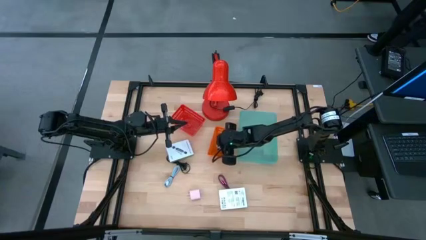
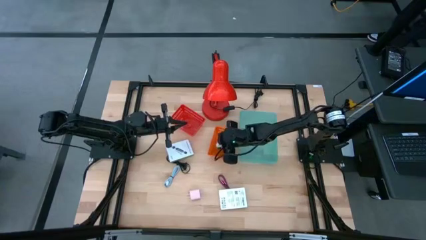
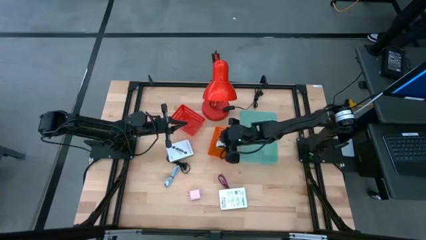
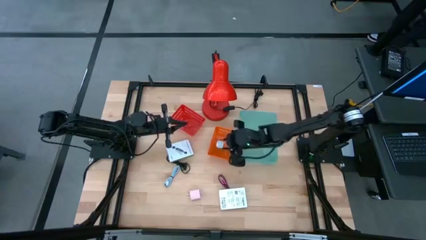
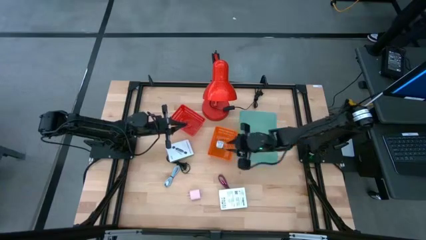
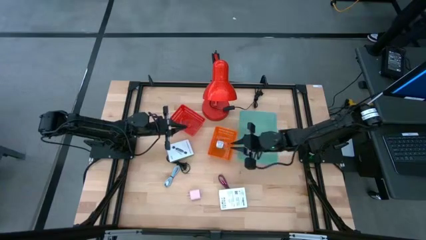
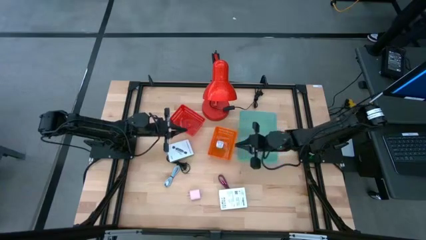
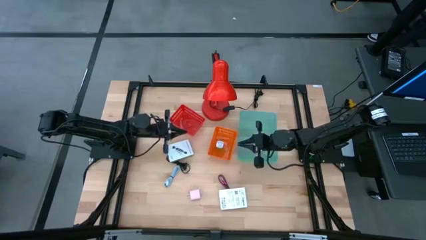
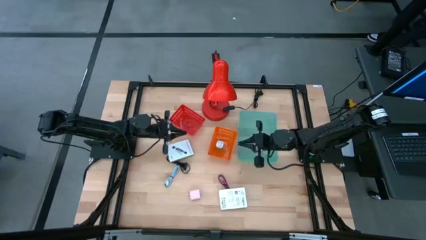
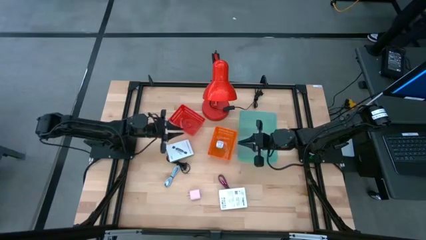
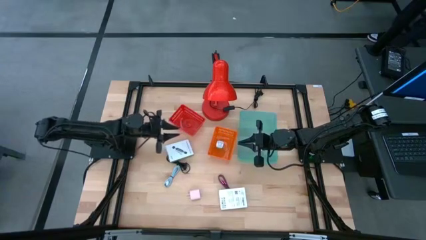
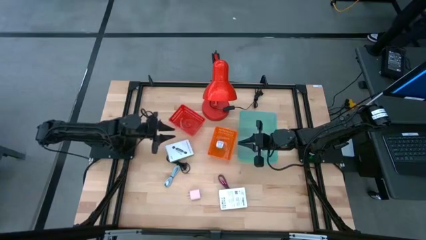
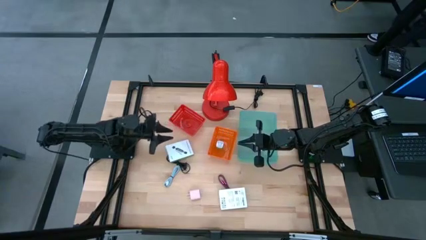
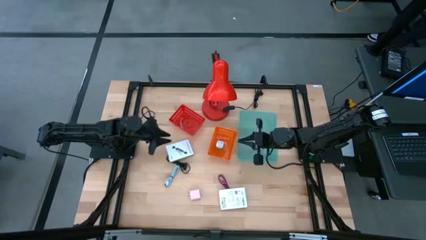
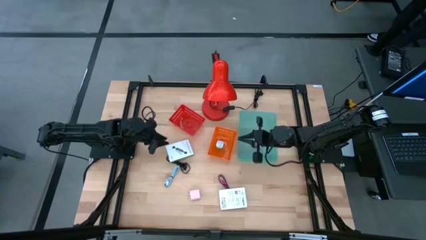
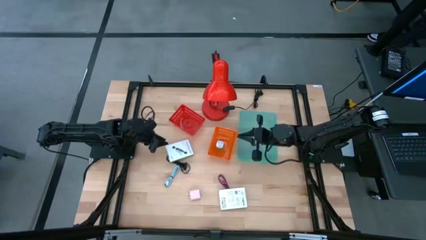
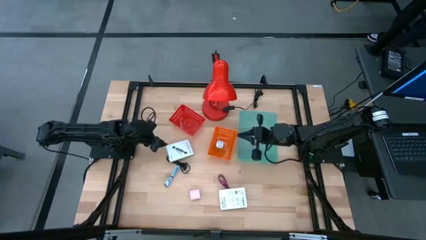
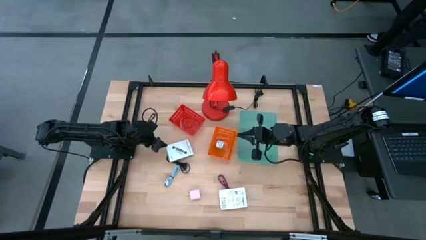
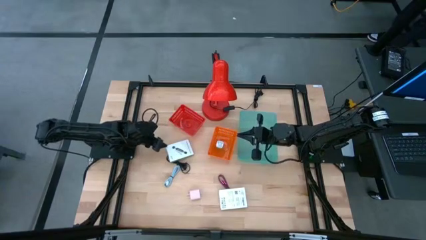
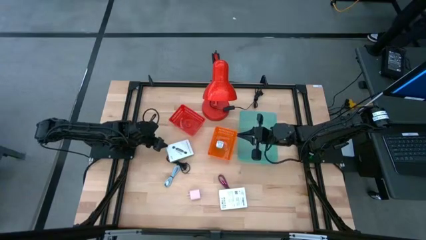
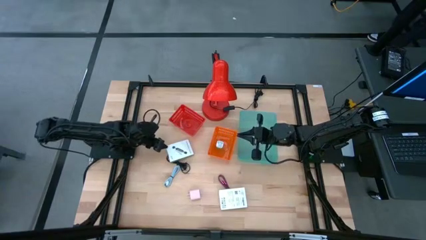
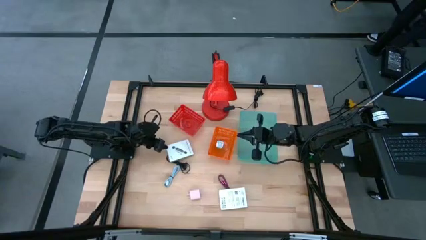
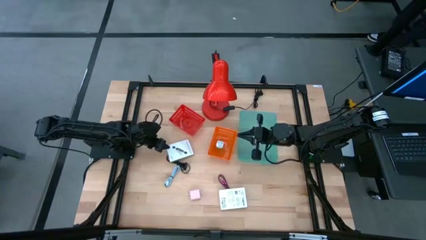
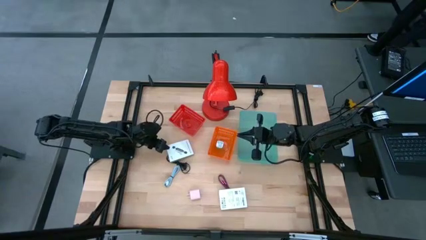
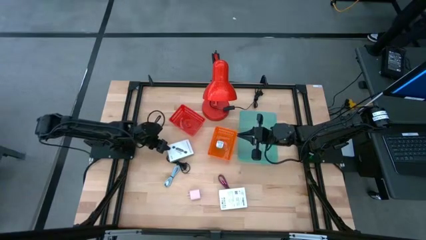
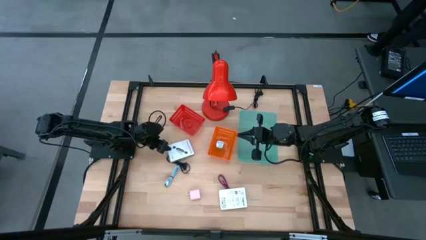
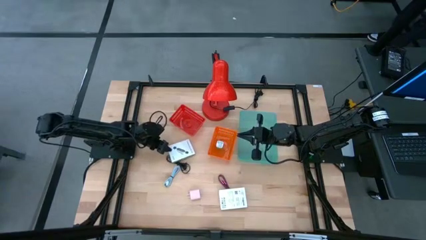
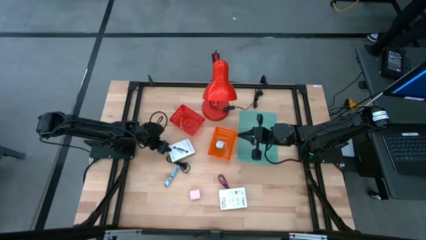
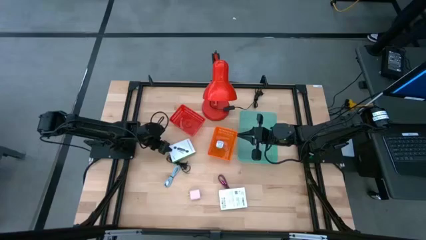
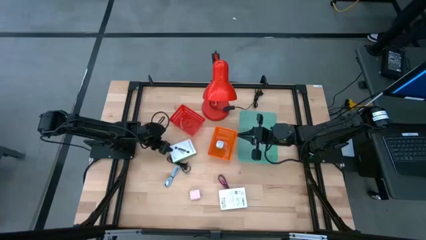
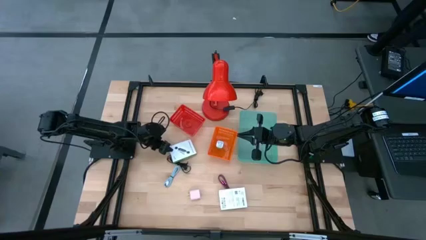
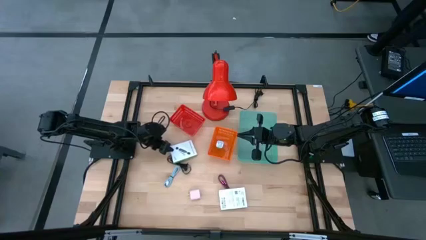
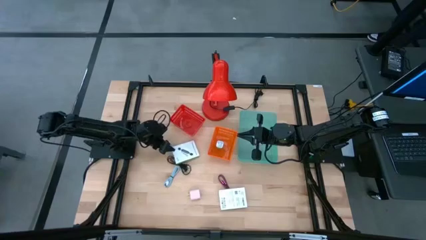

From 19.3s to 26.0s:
Task: Pick and place items into bin
Put the top card reader box into the red bin

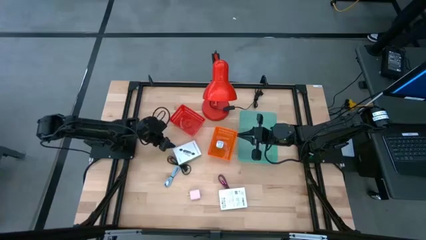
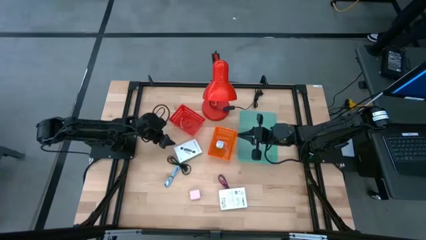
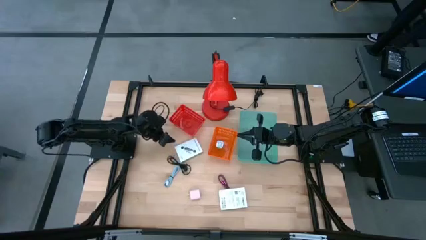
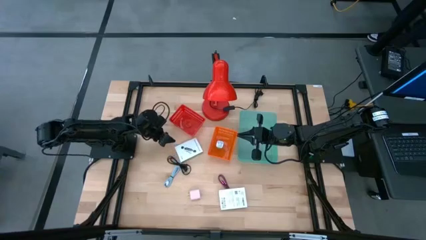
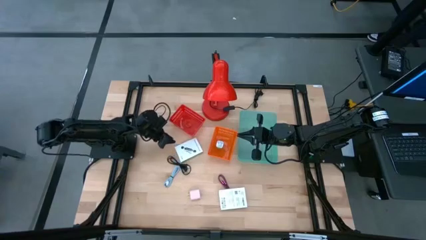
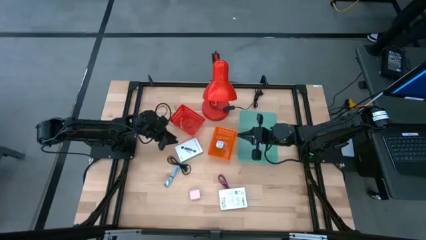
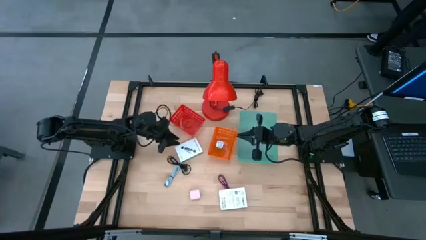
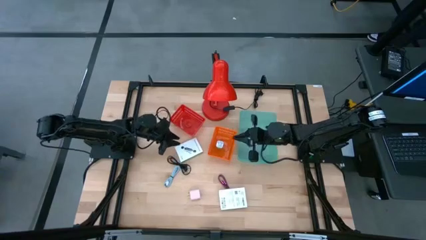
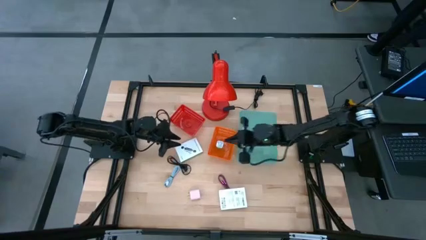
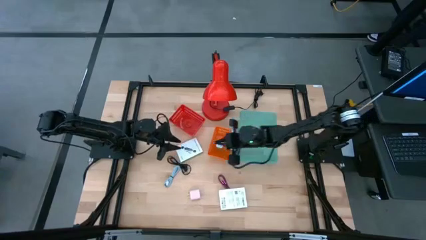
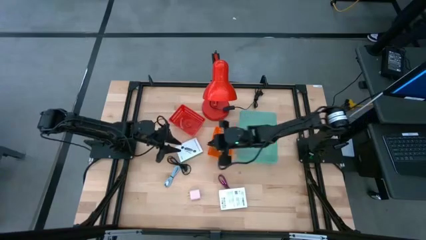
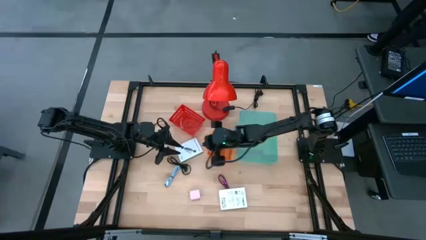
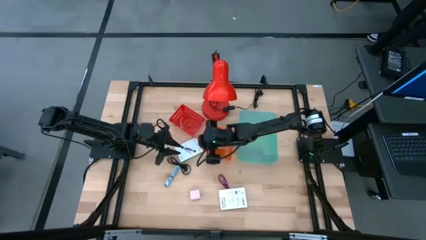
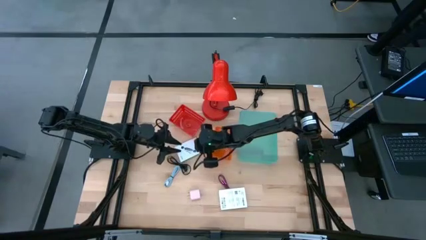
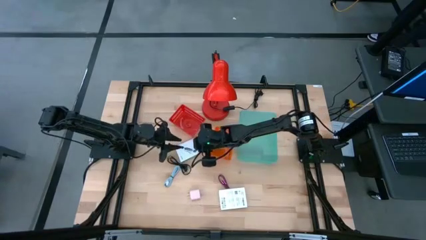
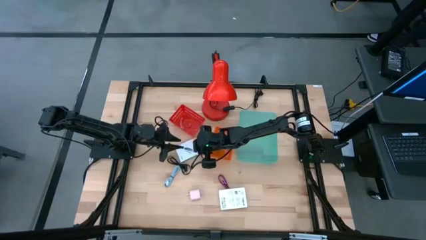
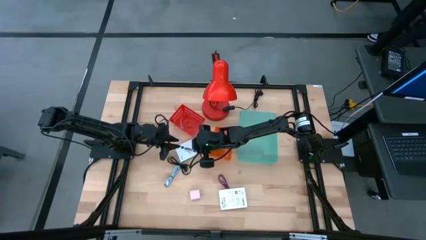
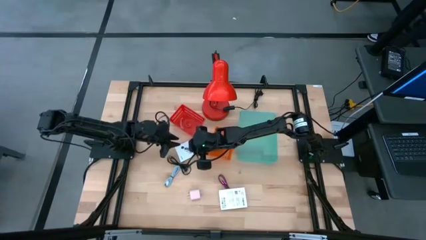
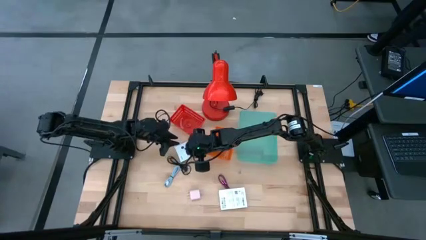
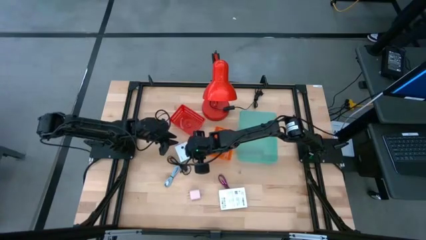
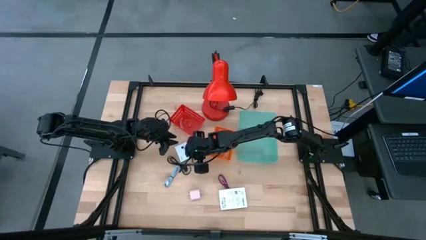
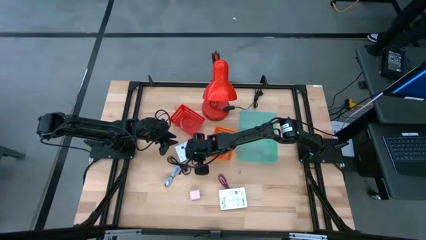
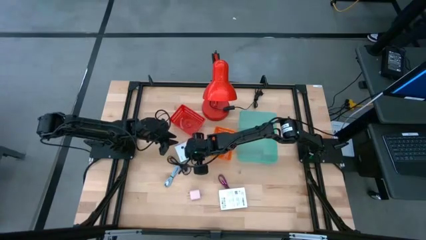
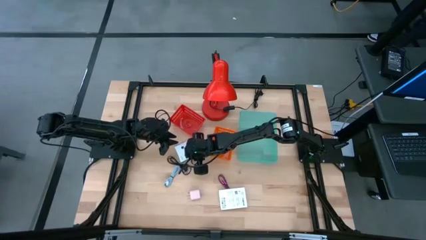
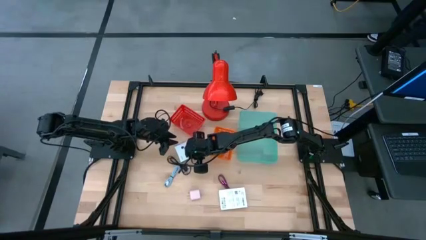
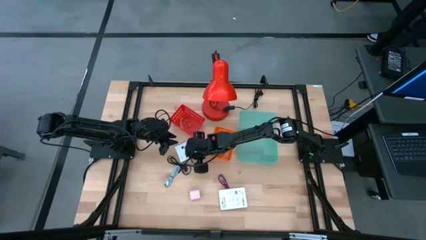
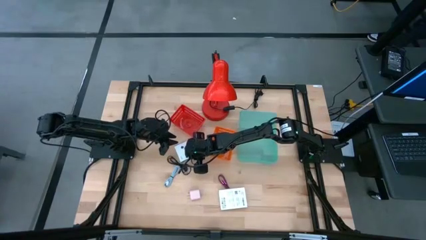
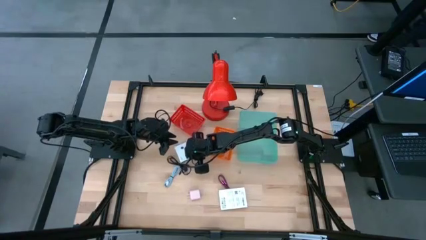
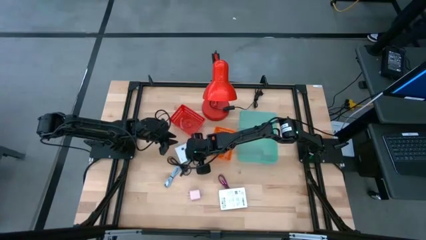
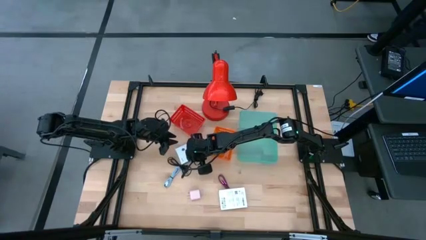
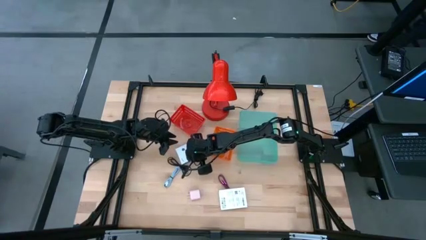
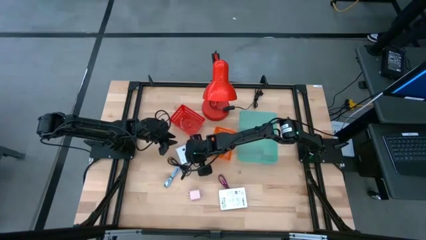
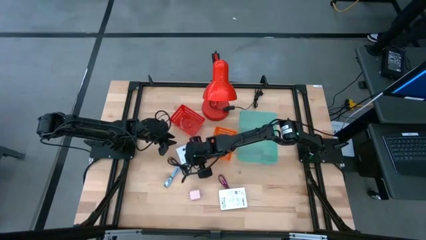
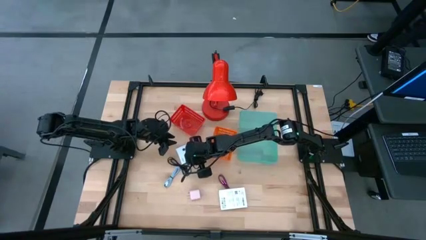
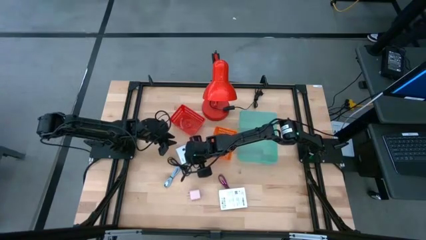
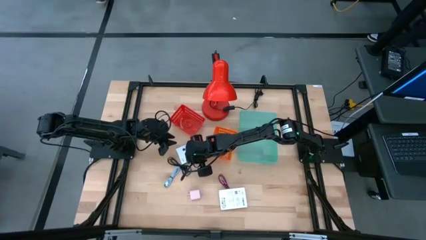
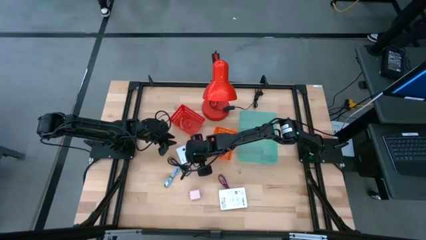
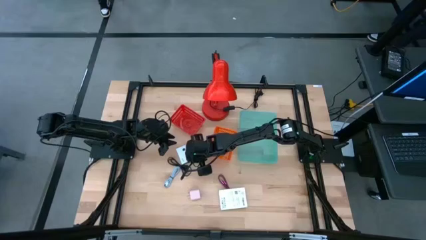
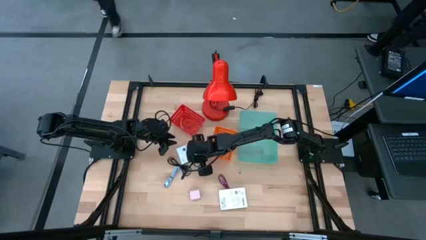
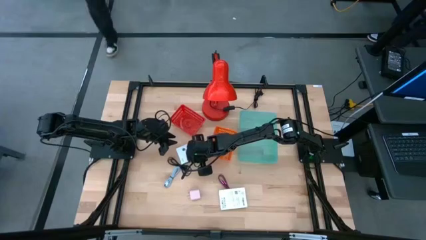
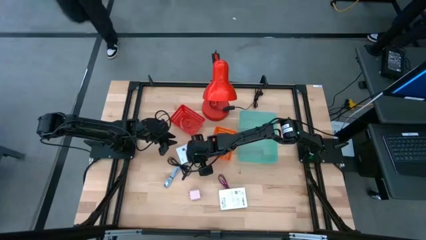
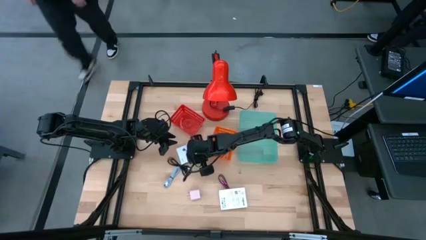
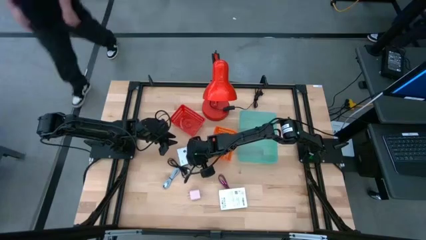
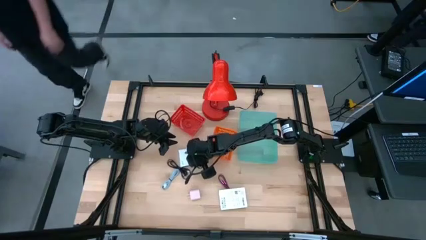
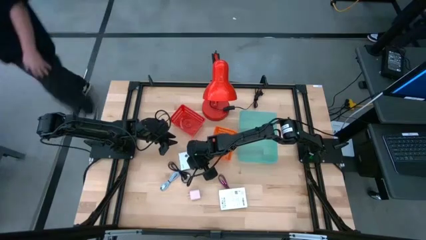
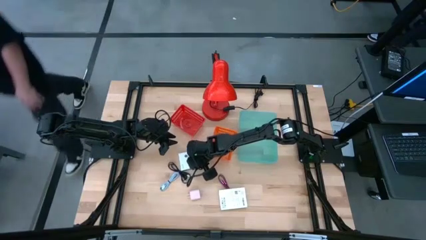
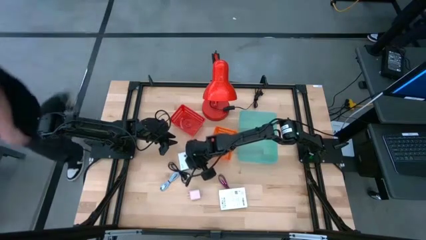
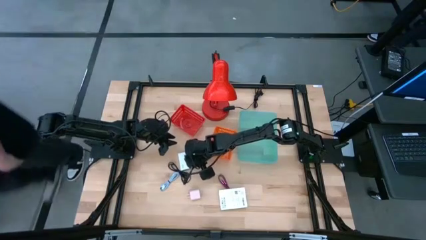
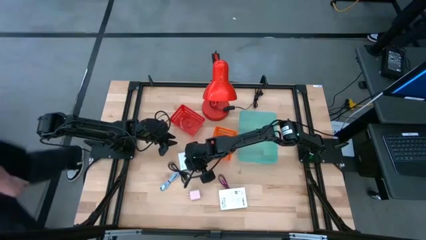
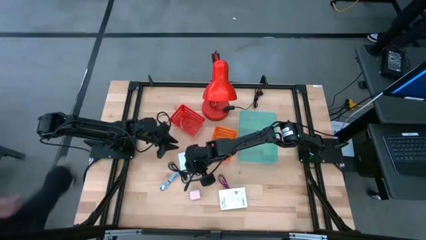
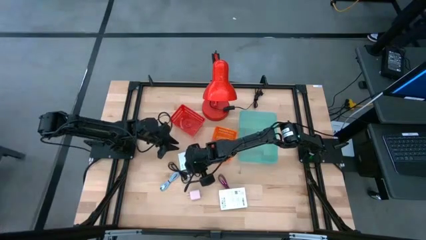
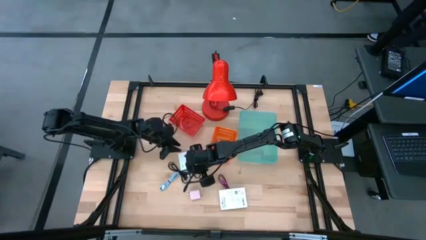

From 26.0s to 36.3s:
Put the top card reader box into the red bin
